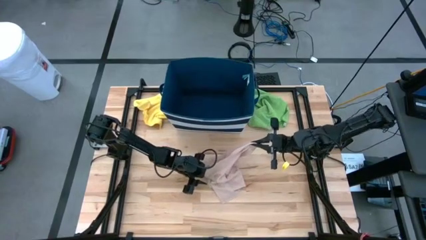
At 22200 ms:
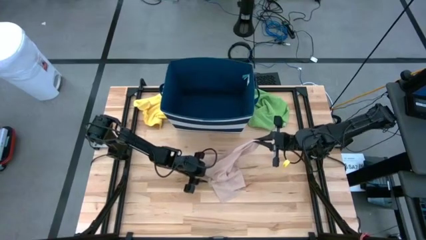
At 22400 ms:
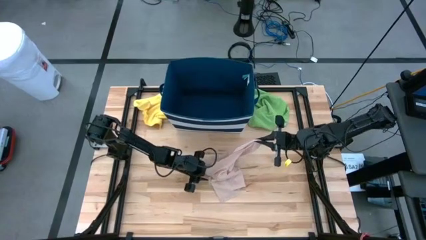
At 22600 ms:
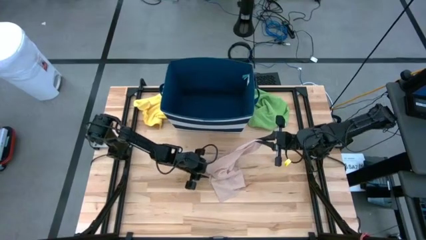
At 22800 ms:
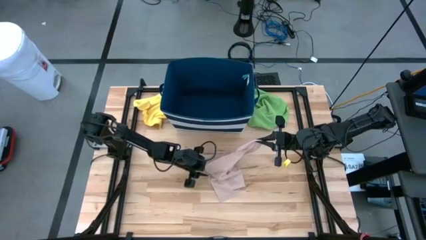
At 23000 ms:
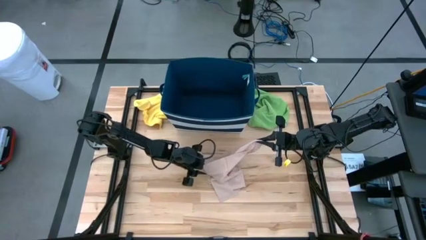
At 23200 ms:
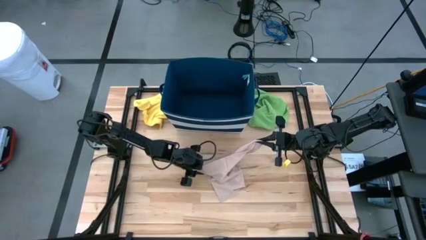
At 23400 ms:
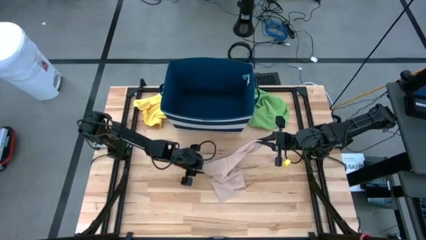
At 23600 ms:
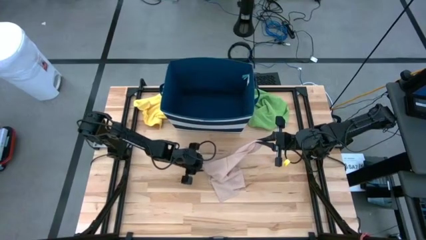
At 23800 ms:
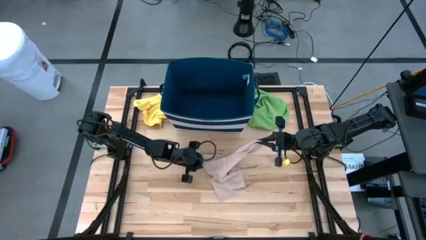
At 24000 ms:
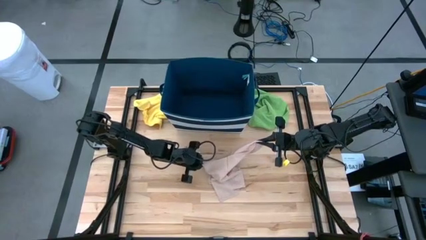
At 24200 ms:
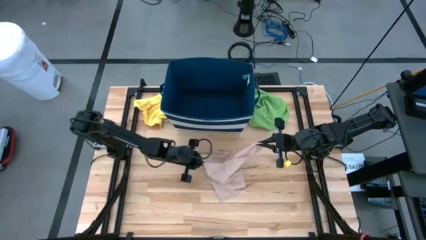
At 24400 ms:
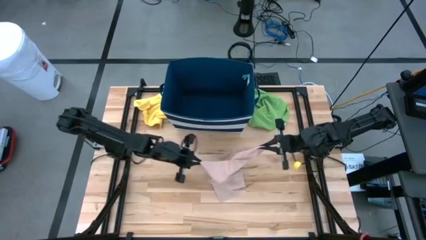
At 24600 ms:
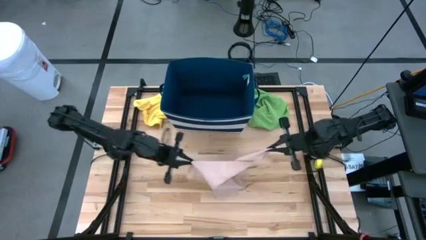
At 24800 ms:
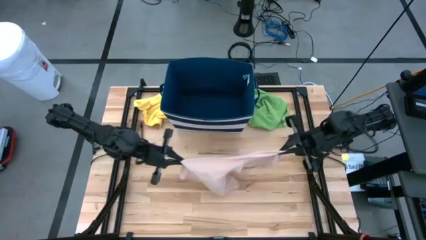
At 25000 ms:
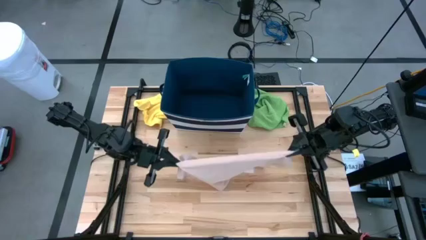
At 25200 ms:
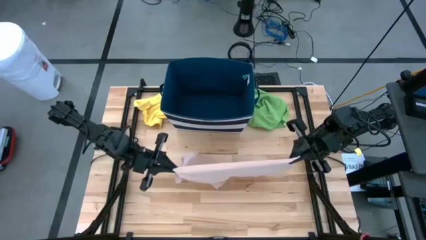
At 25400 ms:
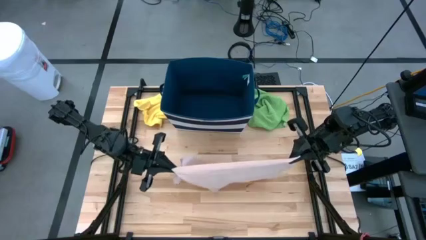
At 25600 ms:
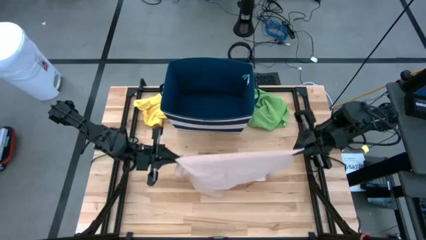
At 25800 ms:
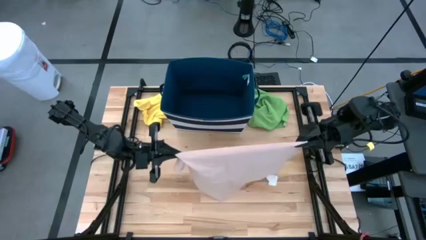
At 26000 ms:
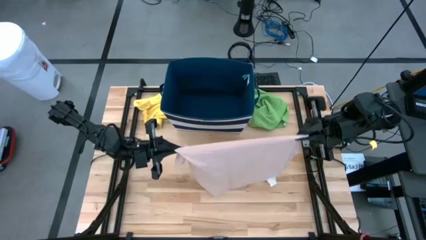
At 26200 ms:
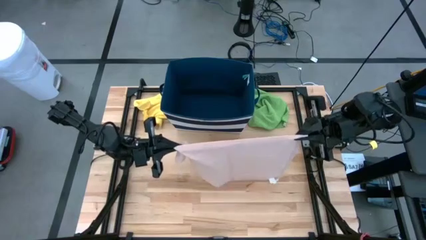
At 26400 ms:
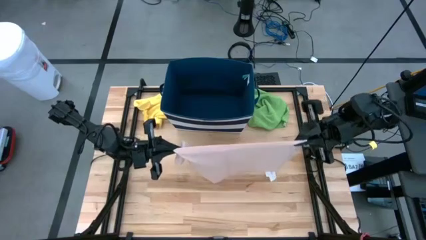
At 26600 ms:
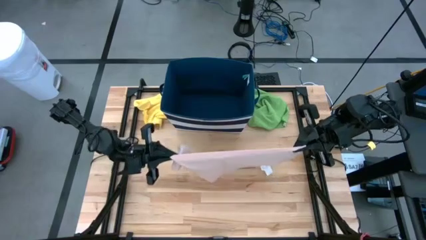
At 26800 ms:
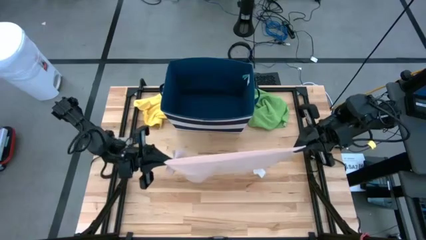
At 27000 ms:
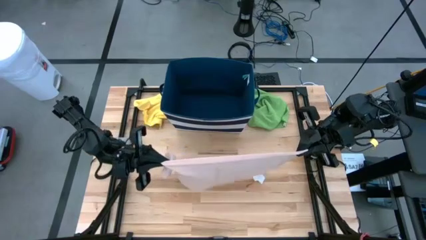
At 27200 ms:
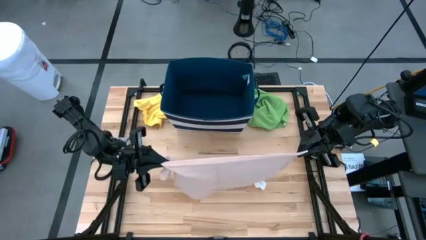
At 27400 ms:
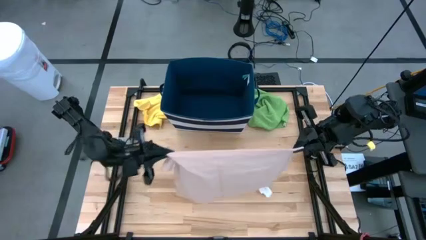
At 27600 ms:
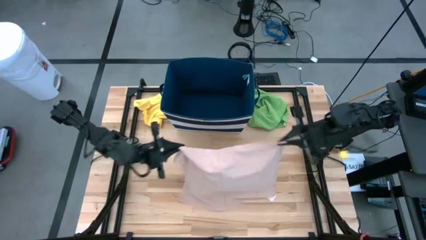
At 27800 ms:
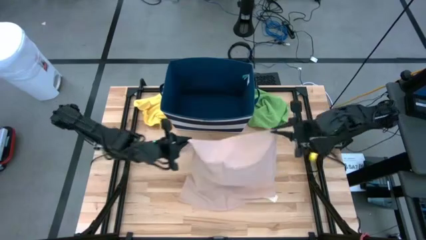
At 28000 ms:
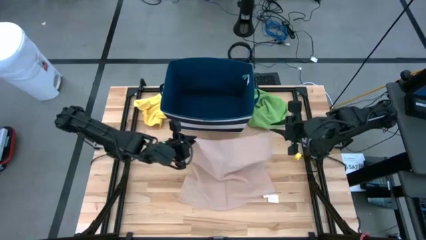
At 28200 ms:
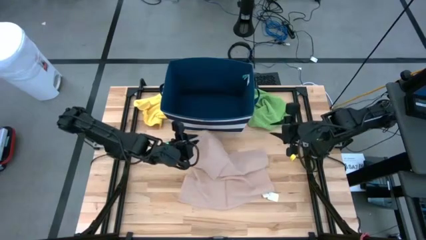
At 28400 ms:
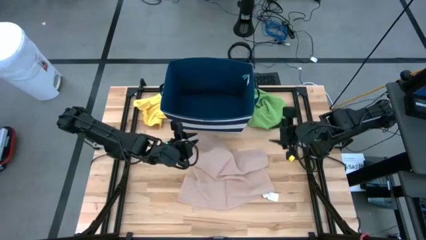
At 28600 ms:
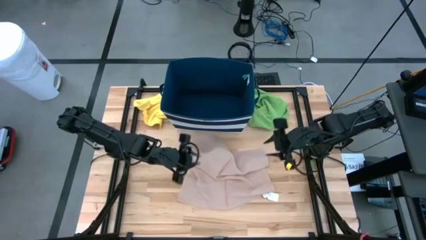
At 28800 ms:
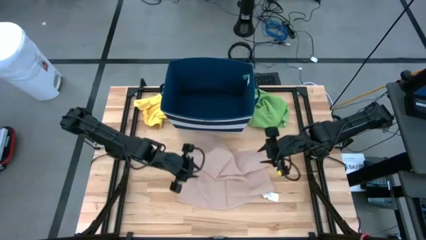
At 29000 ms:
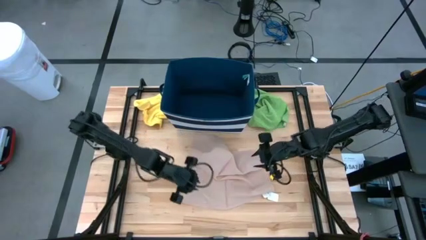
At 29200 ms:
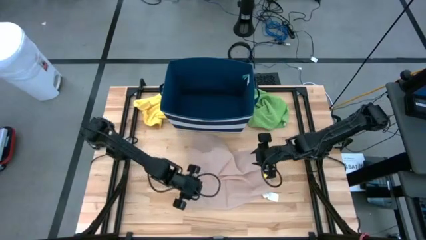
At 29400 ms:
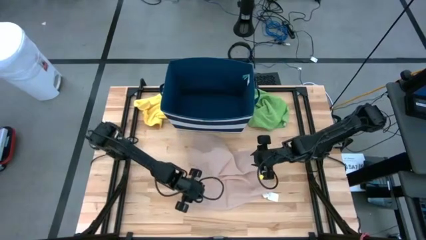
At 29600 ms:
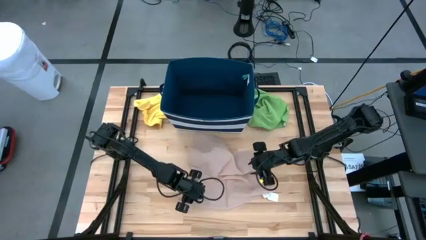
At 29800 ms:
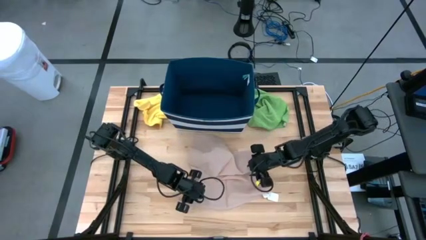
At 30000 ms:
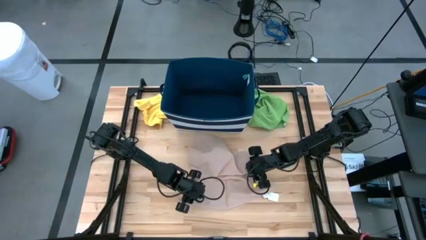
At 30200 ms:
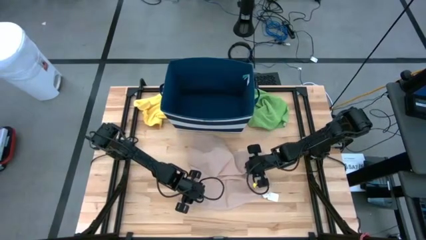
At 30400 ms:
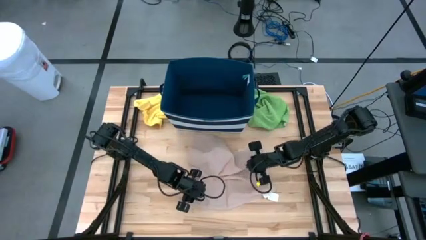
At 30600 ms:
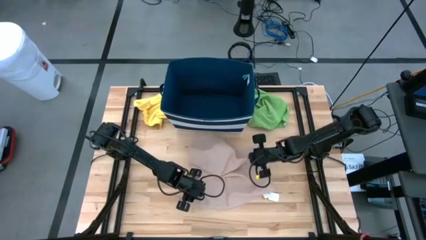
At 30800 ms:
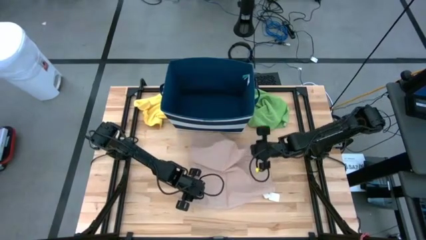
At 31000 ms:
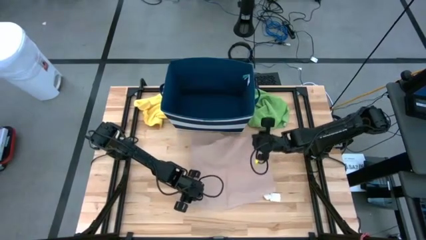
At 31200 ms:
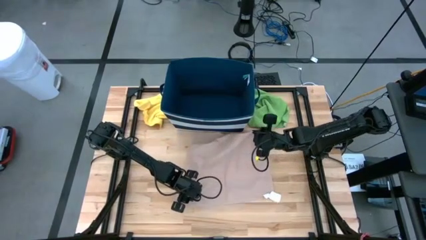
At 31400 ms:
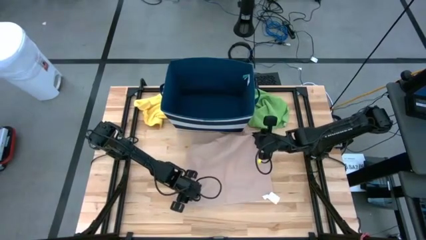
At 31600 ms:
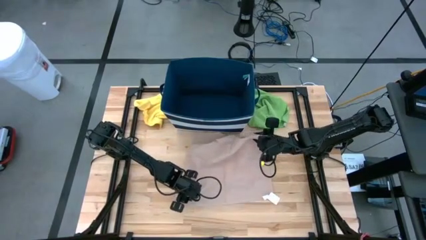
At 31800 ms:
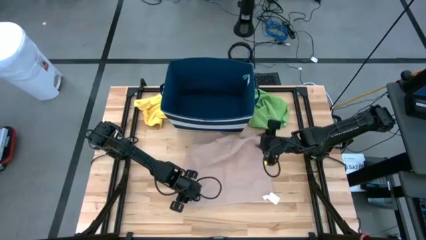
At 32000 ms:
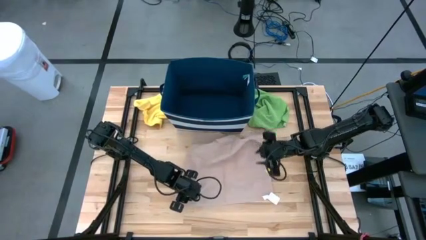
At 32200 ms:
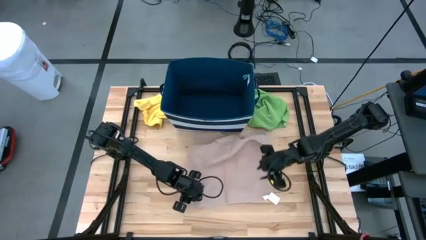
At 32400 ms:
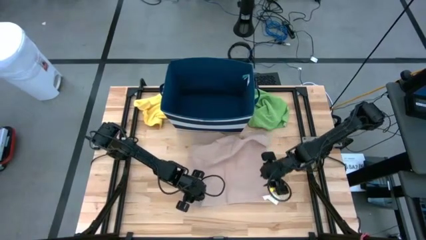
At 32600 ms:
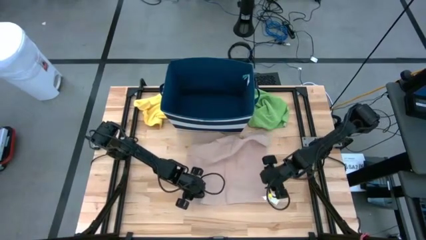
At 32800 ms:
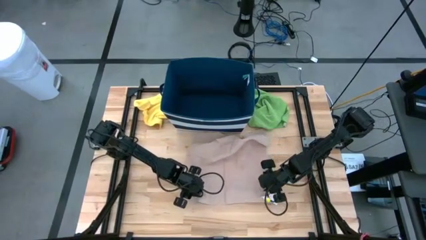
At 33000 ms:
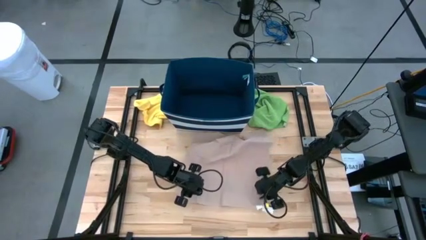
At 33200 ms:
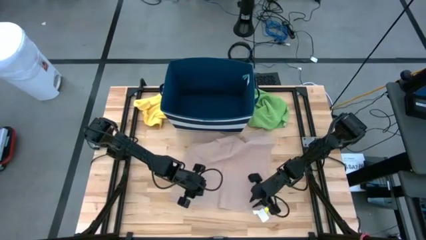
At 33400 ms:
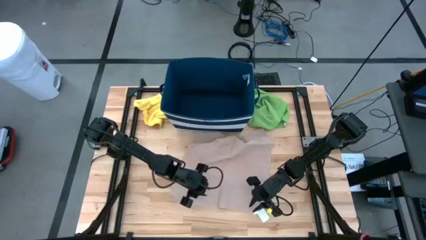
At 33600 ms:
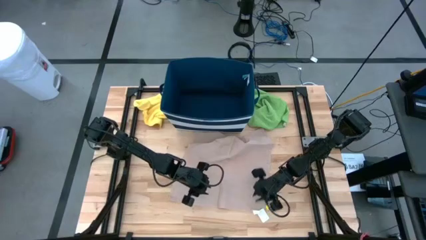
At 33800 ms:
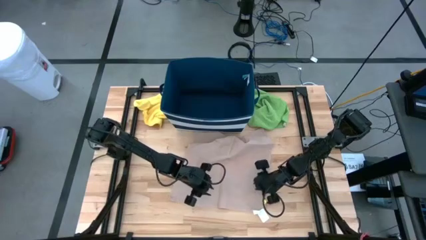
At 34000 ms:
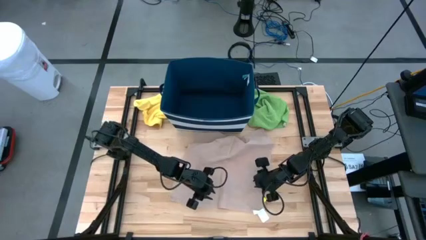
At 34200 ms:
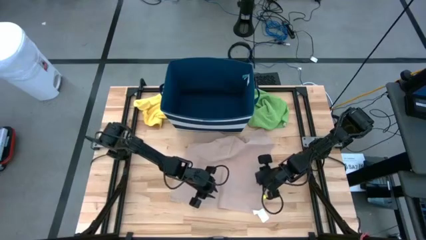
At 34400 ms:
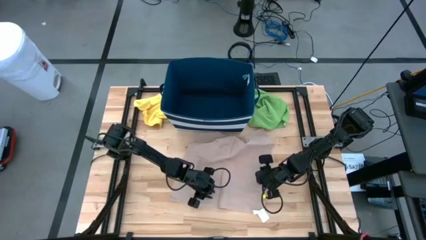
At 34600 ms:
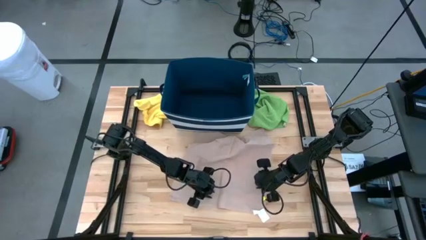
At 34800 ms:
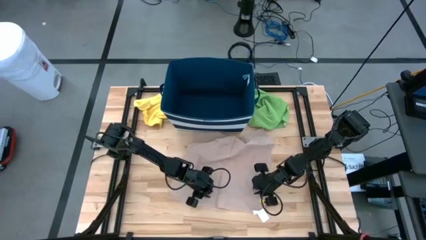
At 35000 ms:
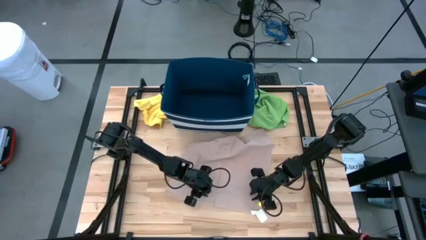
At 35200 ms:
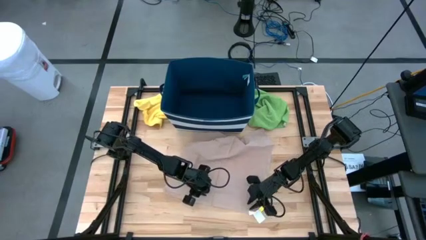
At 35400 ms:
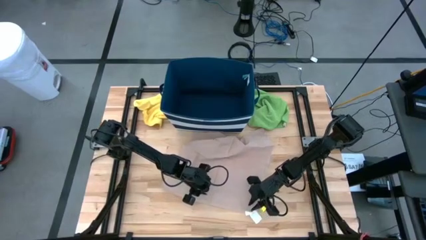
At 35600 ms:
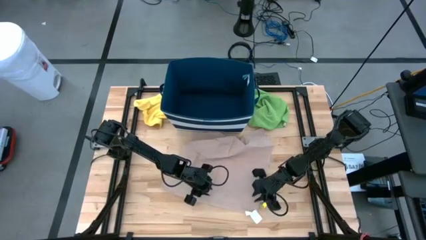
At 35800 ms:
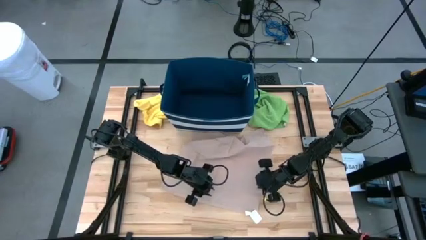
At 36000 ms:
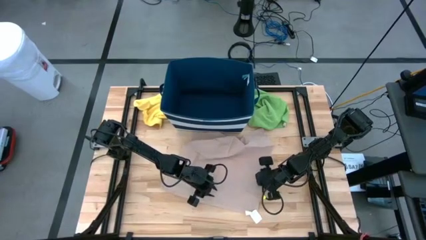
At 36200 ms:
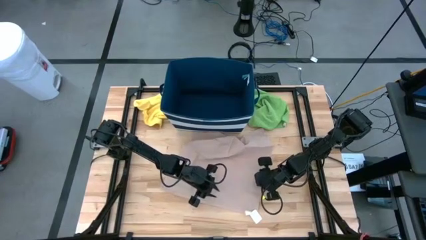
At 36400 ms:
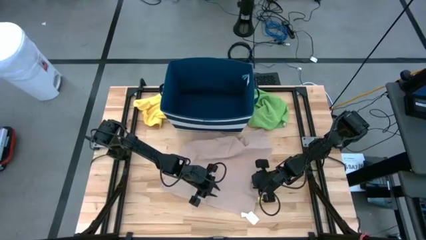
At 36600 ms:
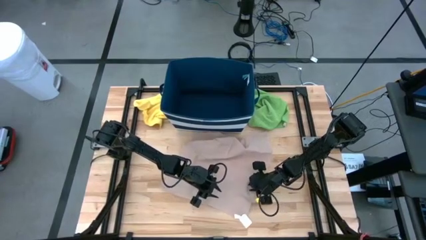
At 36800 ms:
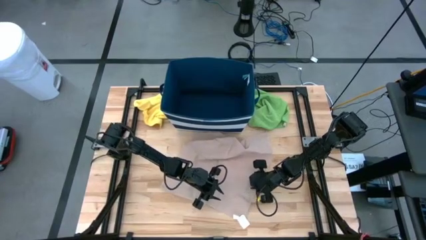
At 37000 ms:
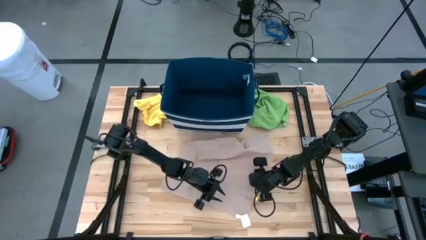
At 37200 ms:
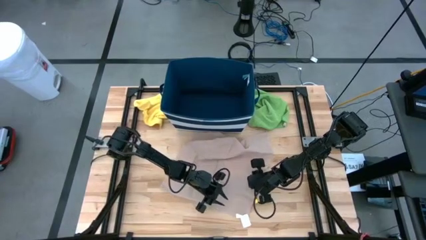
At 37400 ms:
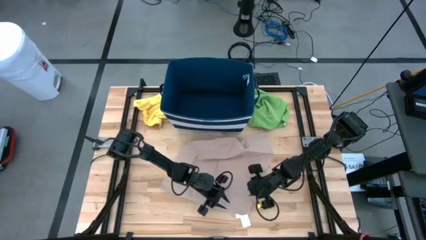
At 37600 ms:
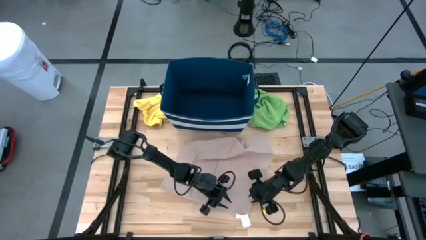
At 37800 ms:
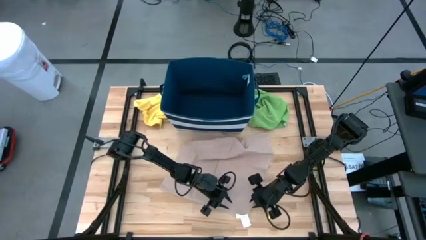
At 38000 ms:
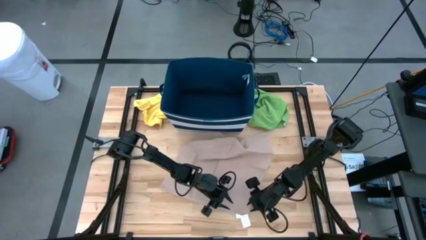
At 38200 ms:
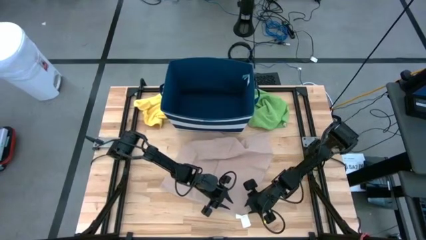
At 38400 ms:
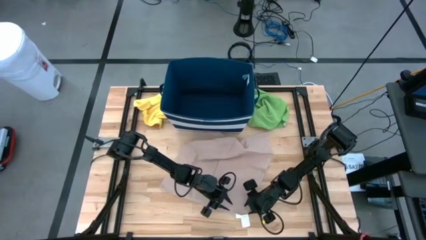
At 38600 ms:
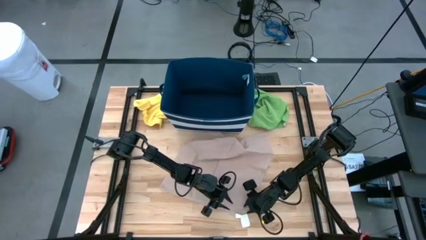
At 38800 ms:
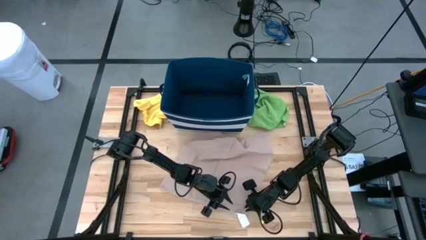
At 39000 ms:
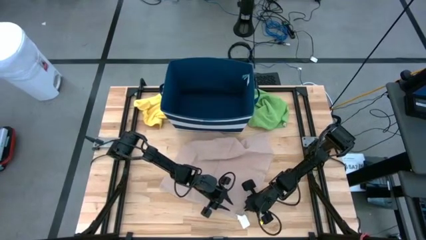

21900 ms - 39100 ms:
Task: Fold towel
Fold the brown towel
